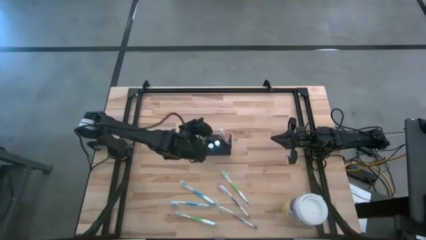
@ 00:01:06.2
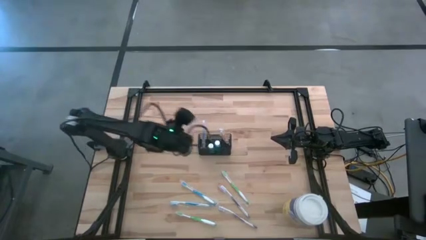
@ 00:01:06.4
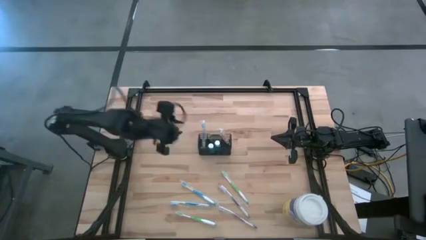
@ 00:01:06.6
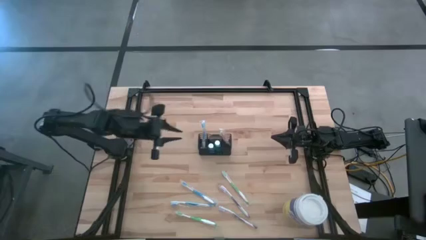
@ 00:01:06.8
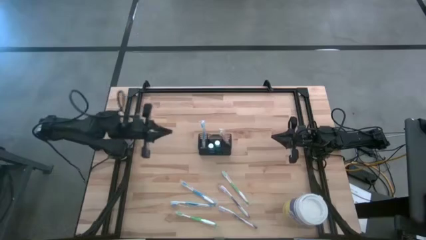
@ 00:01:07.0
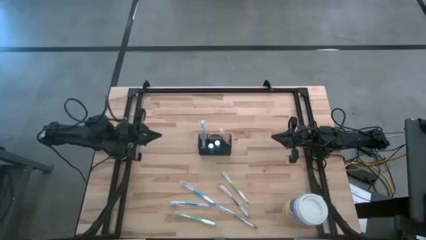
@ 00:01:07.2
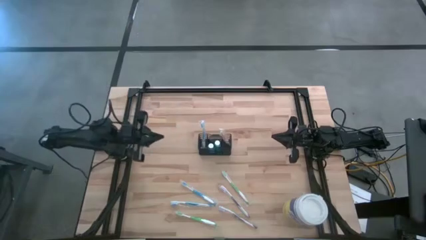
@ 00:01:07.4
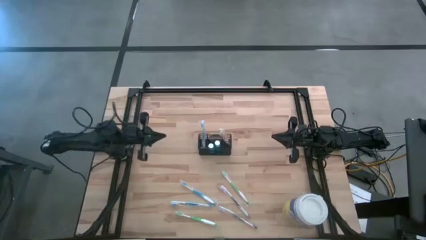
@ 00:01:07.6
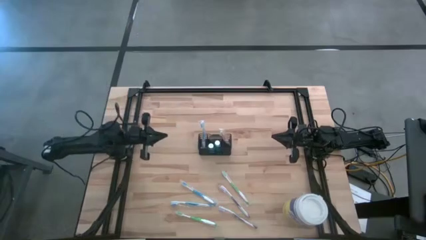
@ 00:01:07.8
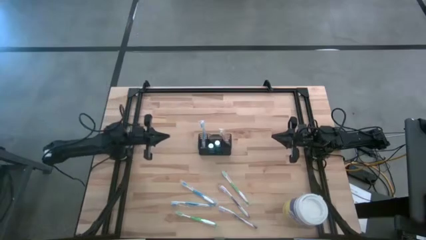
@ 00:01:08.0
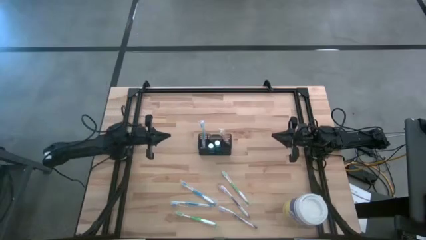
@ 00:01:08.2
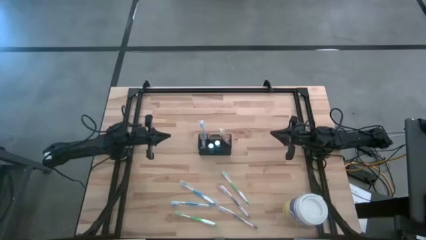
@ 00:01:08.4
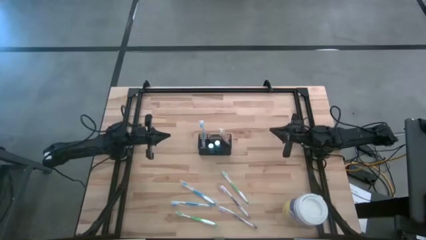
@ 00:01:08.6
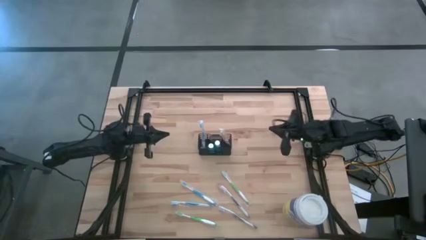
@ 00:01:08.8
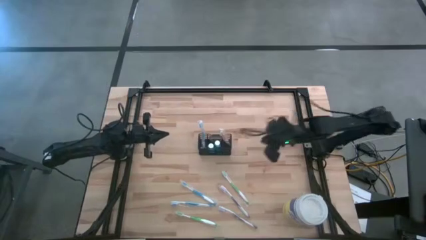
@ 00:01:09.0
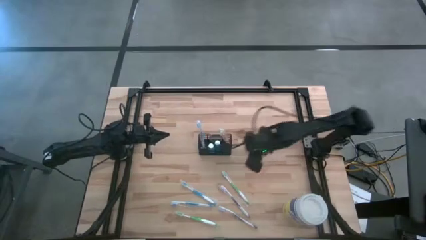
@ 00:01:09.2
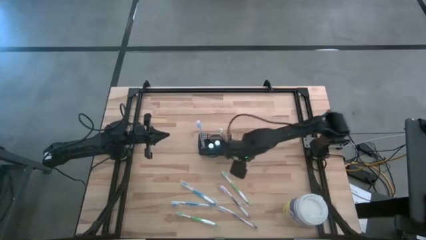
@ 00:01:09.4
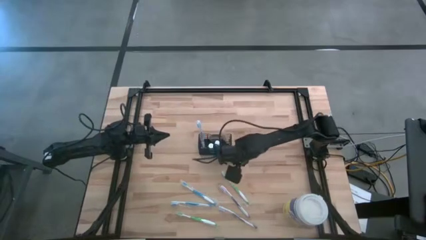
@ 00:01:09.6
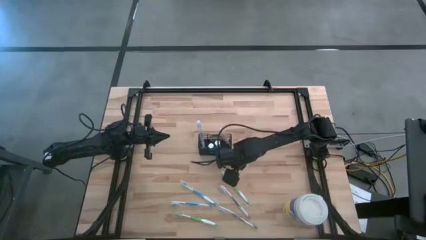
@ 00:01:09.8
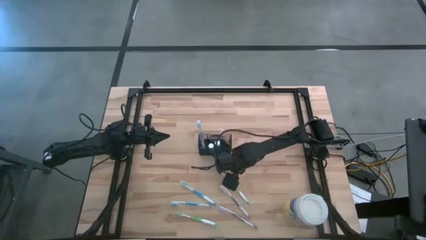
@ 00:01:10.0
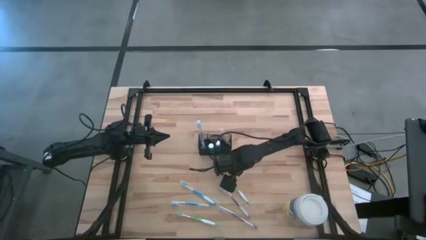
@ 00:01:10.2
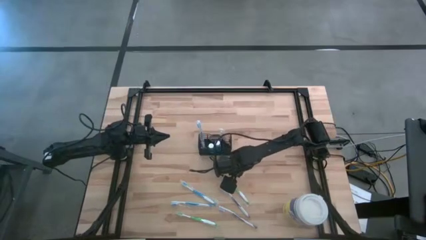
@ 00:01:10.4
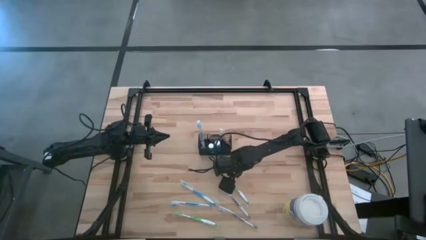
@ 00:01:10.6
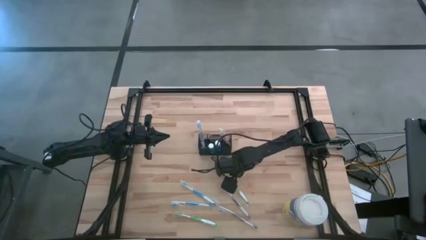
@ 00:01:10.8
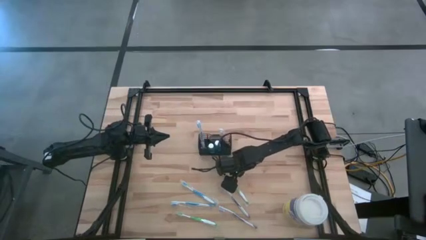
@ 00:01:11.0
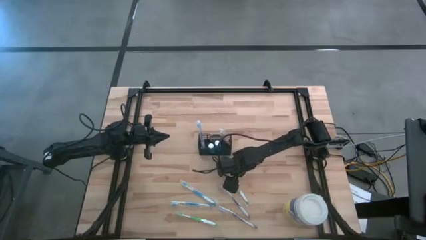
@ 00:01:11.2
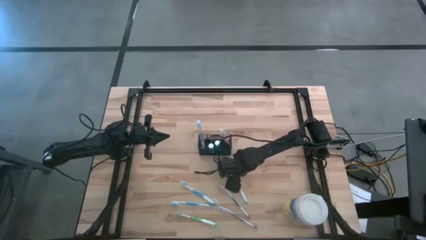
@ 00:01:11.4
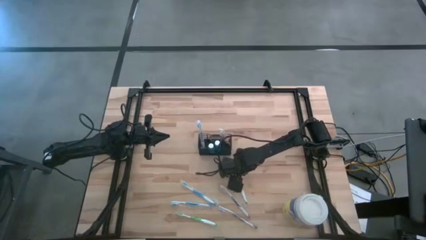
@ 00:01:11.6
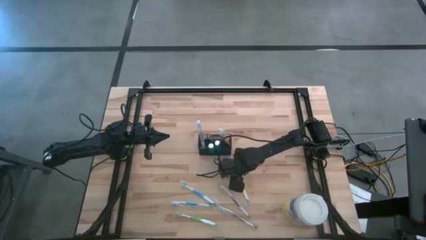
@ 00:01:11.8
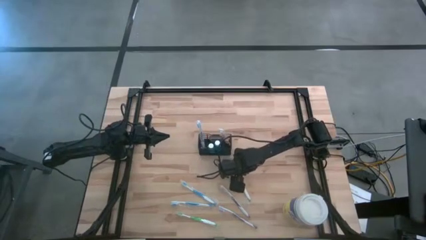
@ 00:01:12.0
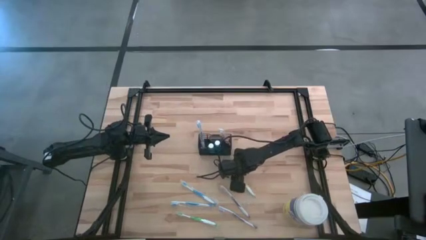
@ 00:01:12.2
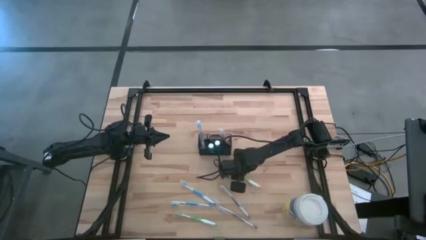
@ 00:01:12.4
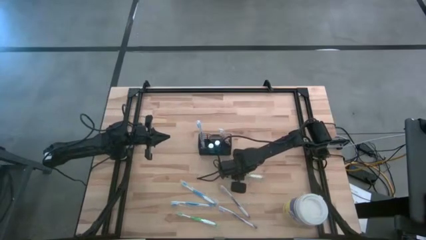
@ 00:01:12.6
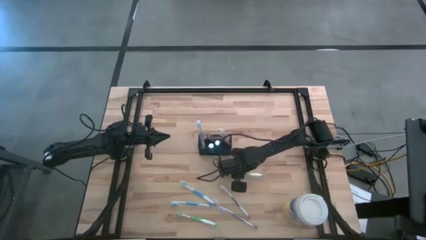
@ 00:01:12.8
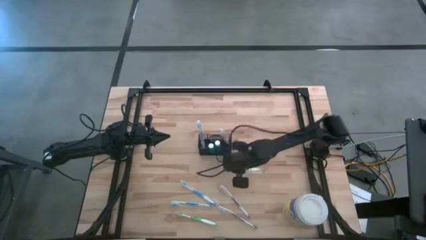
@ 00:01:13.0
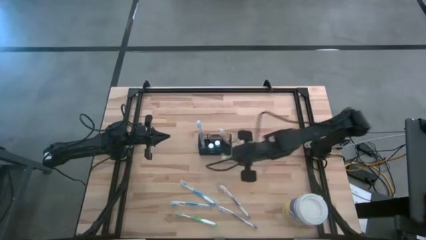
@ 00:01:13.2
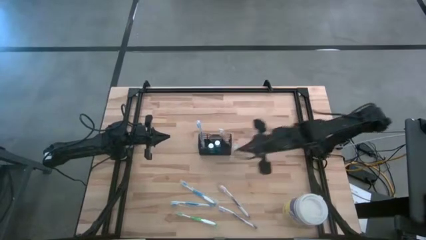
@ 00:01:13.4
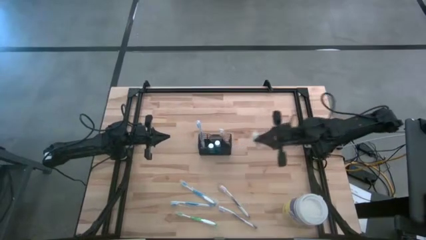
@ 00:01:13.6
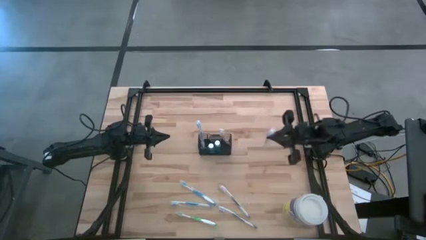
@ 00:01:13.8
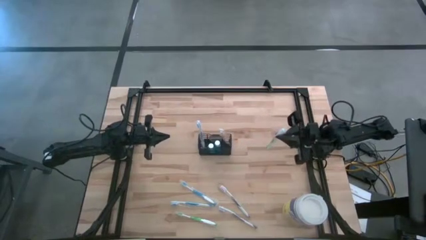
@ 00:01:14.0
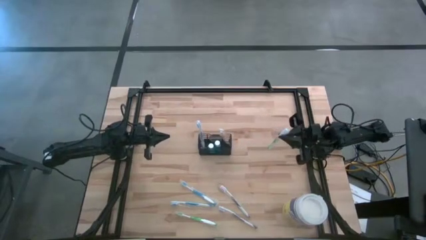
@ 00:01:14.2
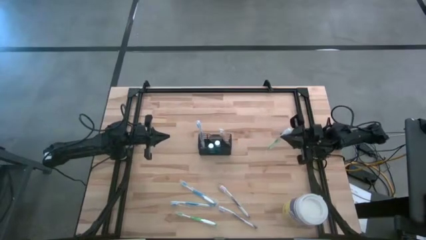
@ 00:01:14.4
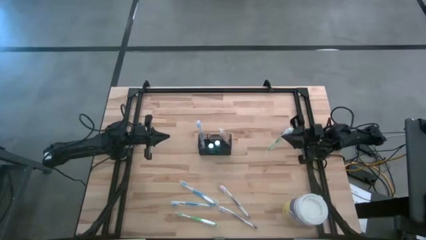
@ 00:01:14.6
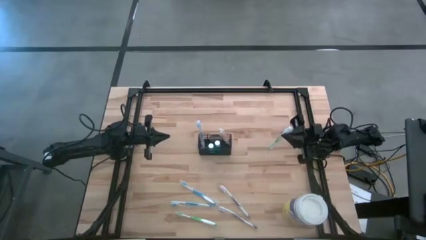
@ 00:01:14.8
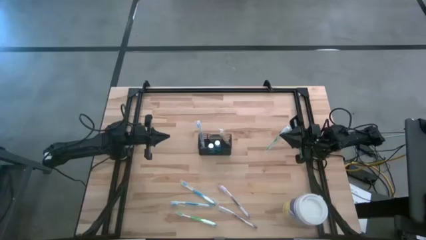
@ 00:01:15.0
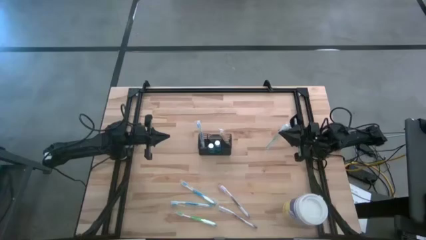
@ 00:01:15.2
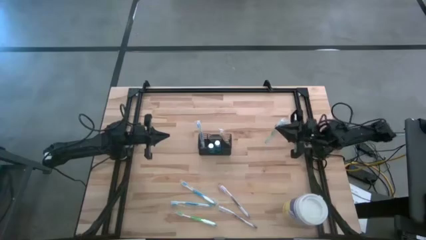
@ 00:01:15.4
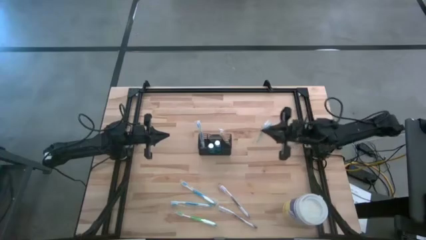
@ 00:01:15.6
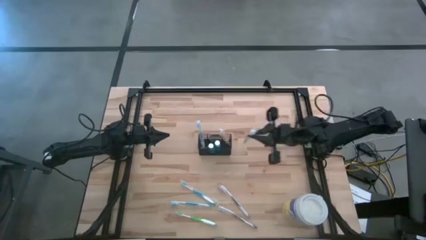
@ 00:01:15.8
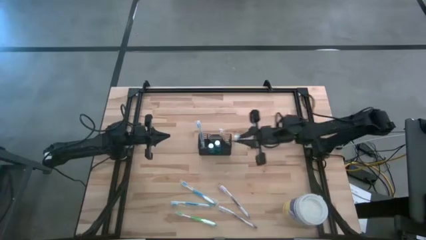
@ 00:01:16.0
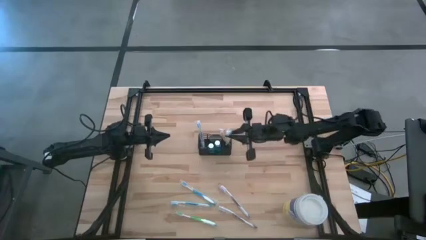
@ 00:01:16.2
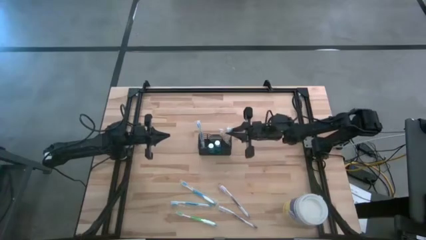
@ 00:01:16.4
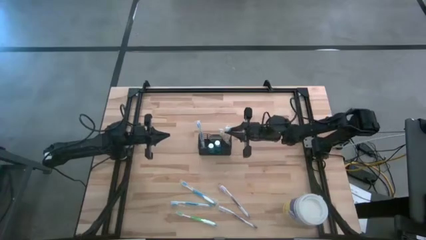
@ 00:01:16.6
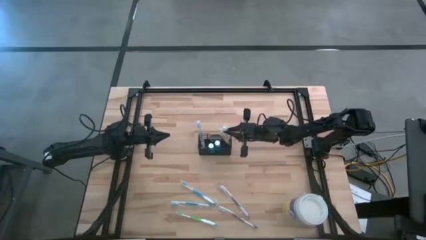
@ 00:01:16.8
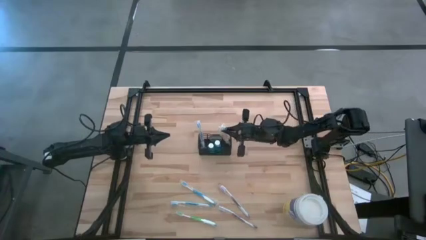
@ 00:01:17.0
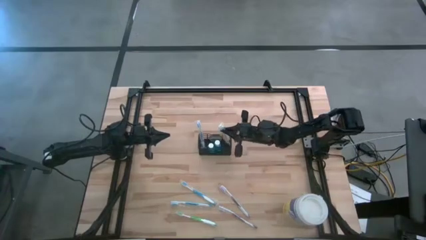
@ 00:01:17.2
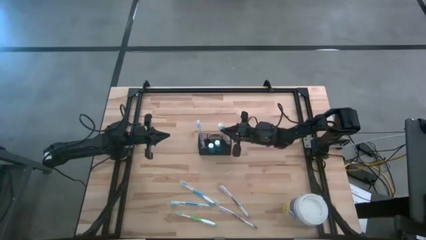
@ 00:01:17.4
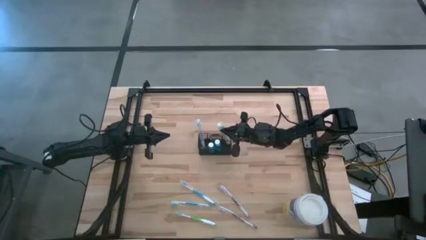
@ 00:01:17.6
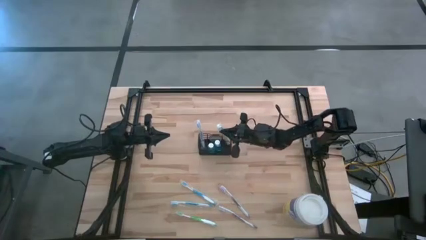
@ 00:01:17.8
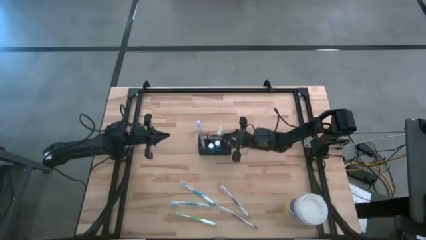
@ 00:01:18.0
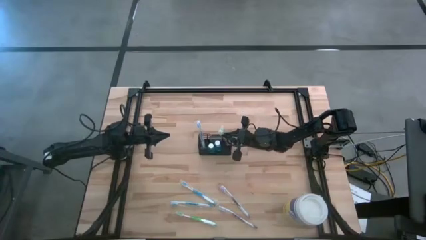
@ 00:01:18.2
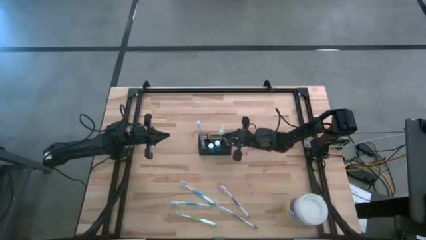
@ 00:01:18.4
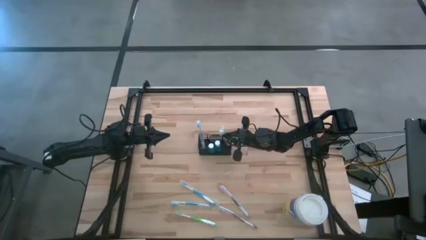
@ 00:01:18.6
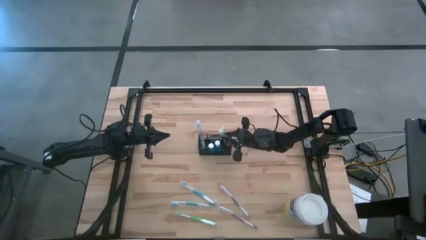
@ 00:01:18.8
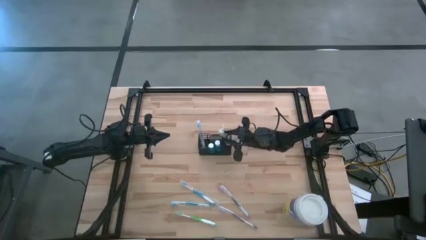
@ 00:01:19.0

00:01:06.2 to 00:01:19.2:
Task: Pick & Place toothbrushing station
Put the top green toothbrush into the black mesh organizer
